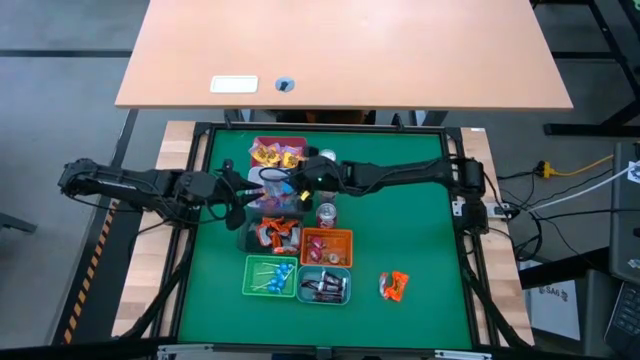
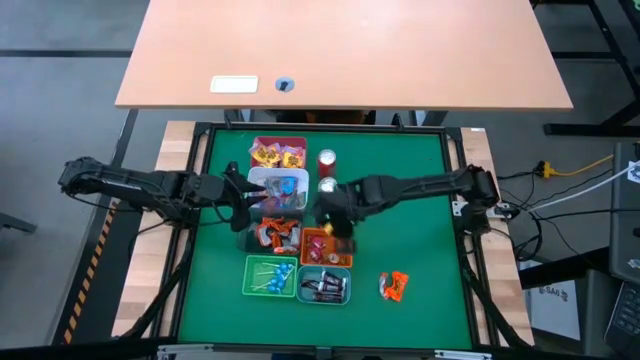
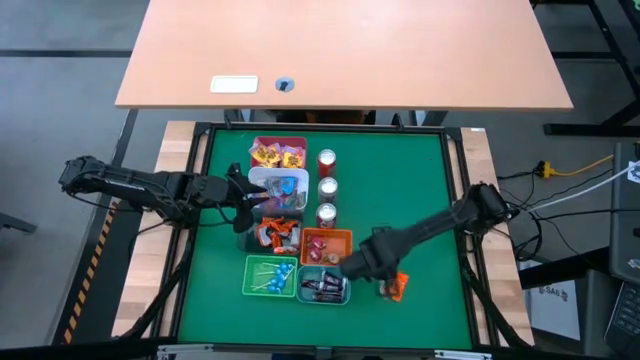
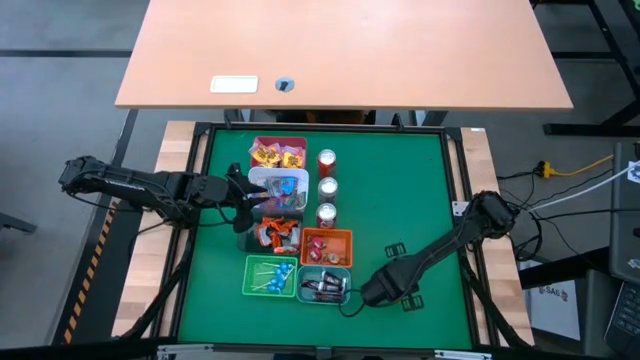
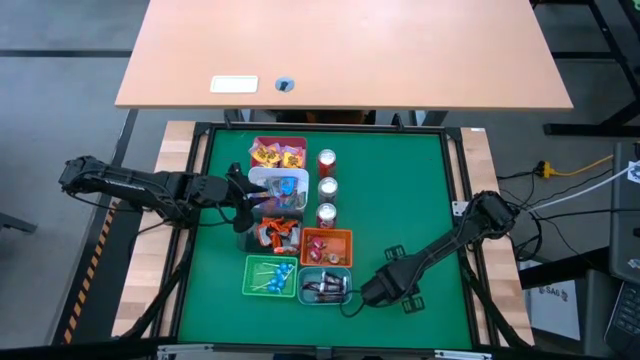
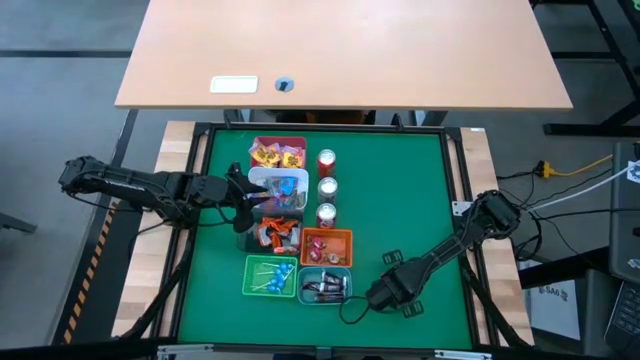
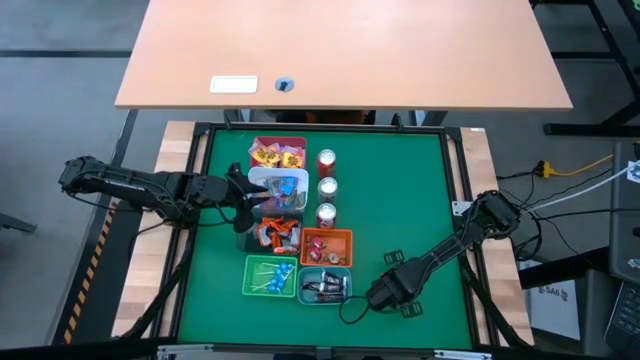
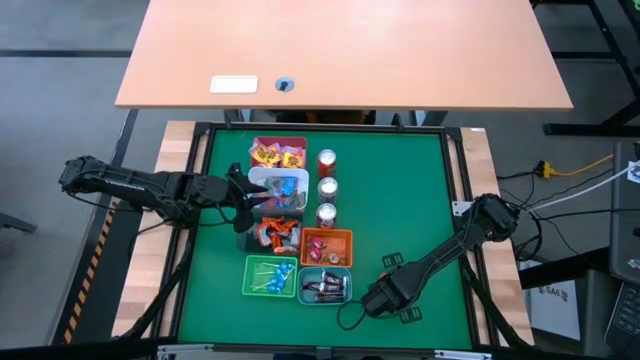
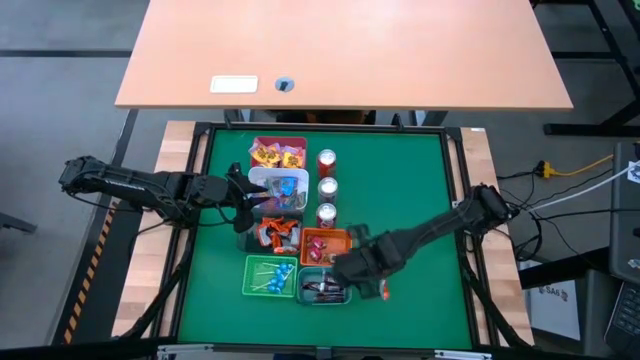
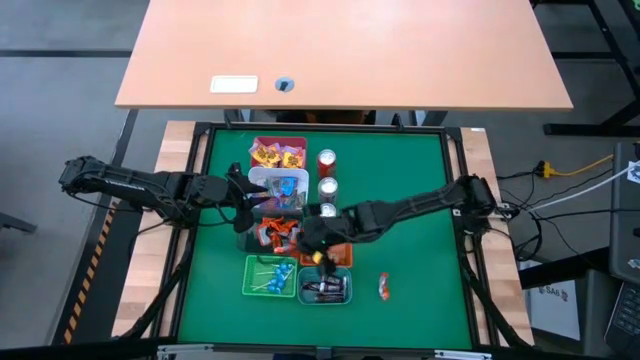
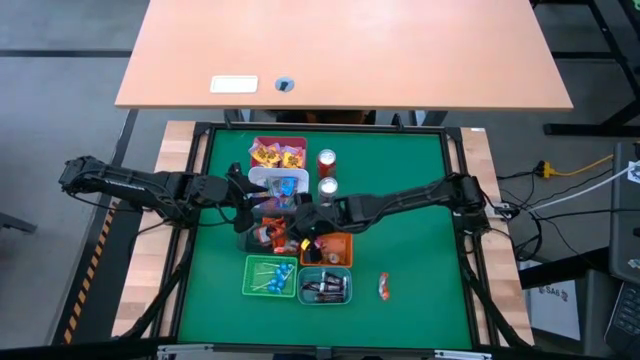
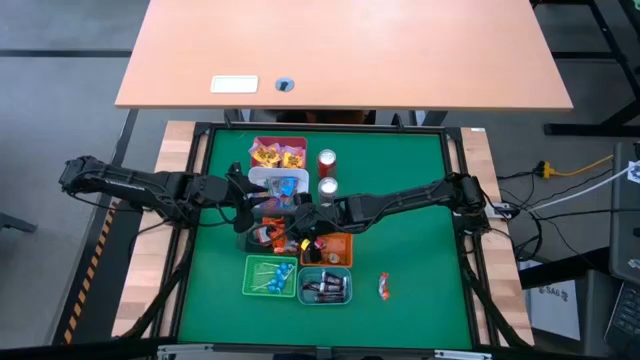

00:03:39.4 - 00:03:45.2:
Task: Sort candy
Put the orange chocolate into the black bin

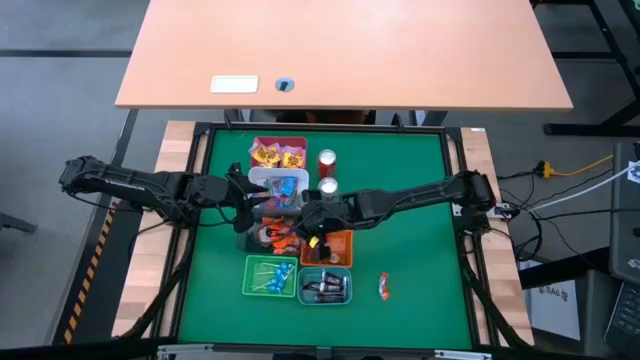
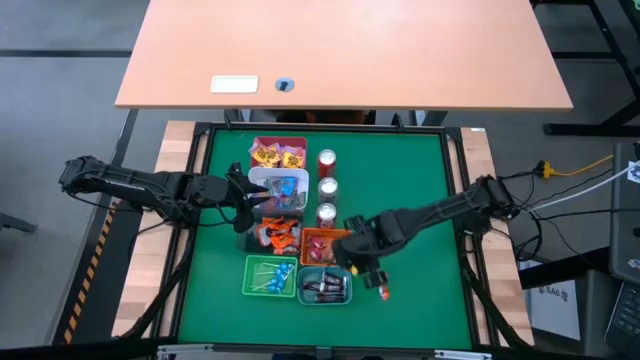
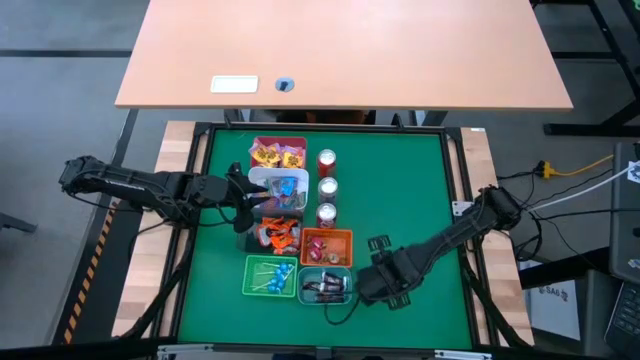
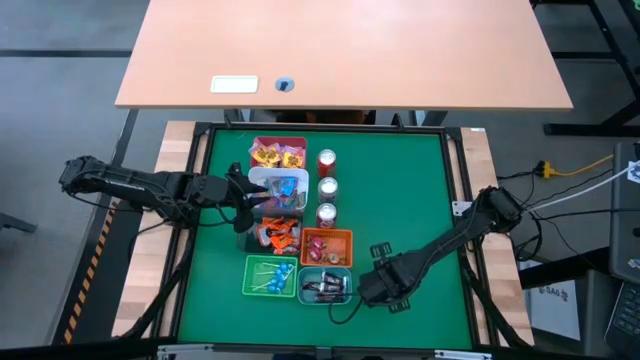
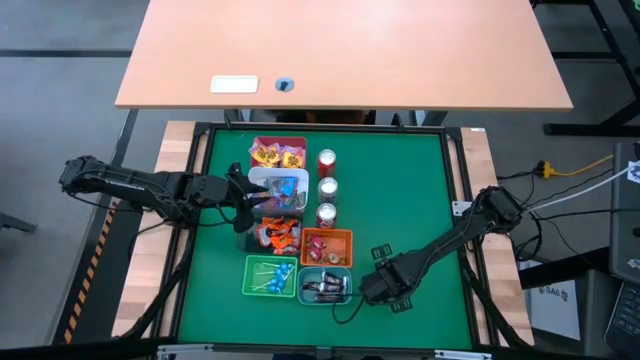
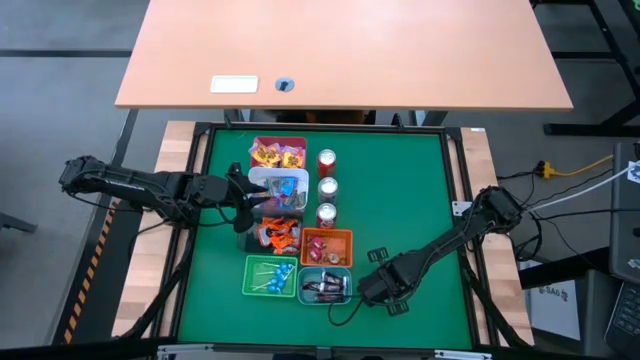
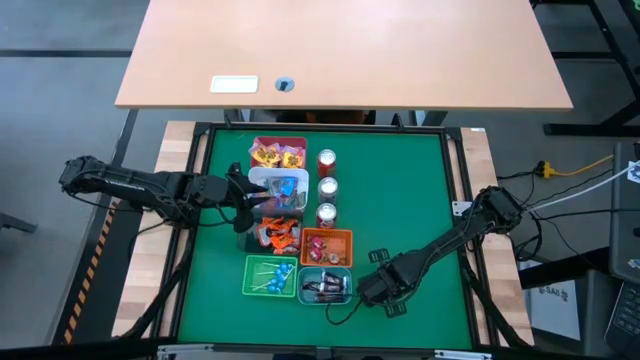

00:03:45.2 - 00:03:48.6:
Put the orange chocolate into the black bin

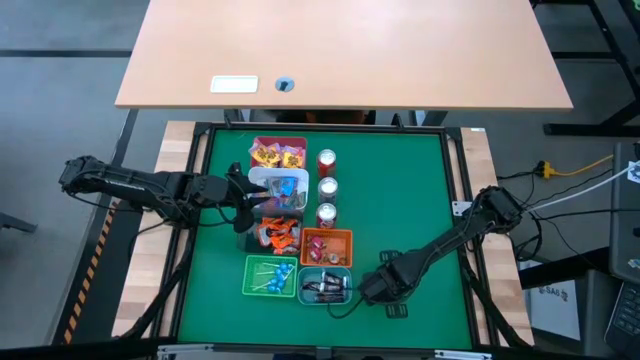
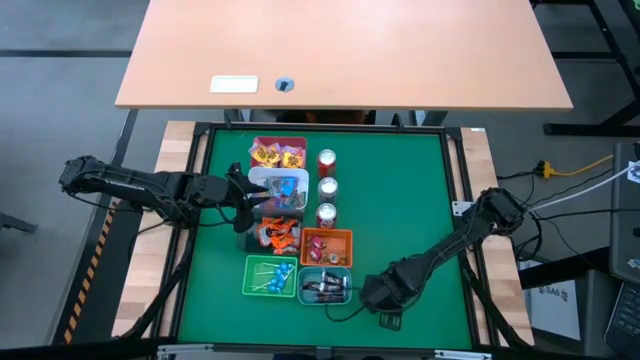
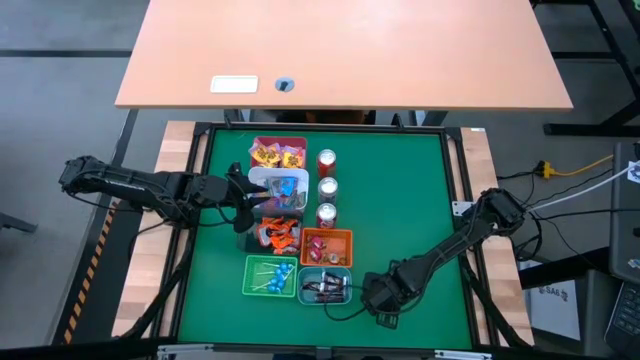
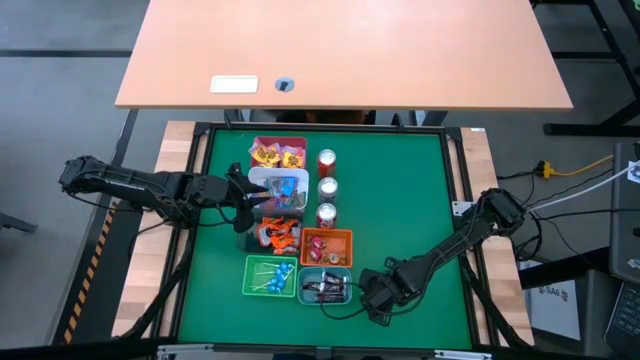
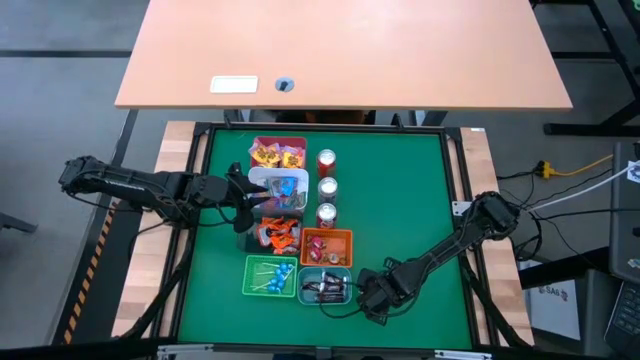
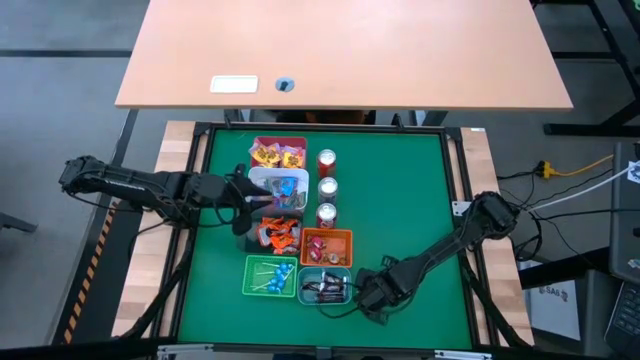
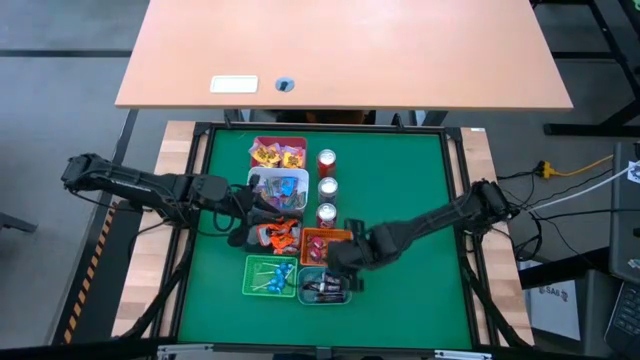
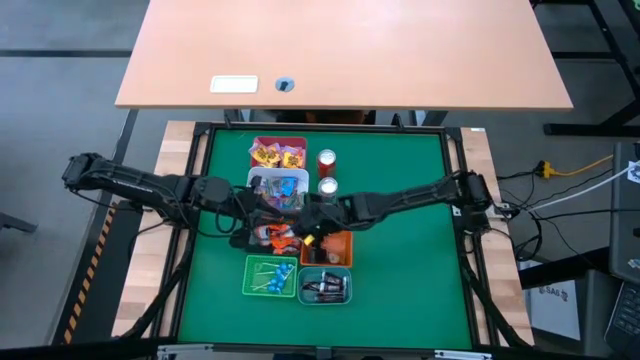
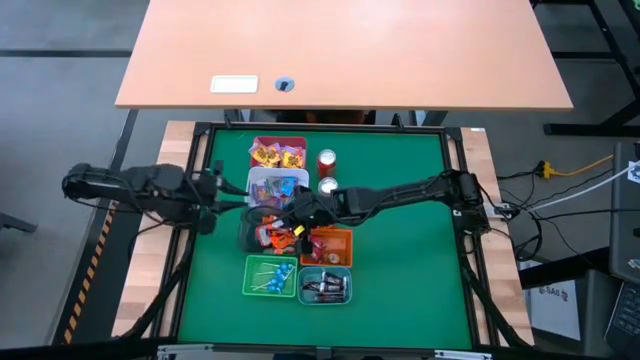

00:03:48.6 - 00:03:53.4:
Put the orange chocolate into the black bin

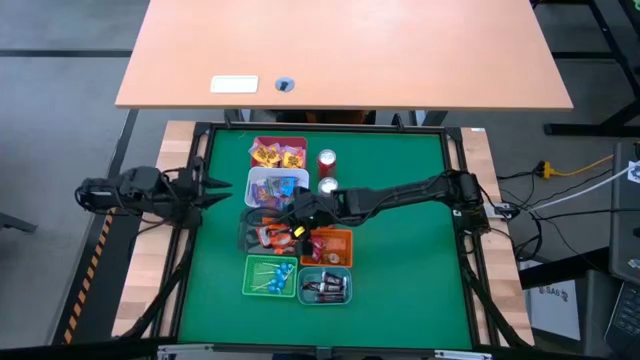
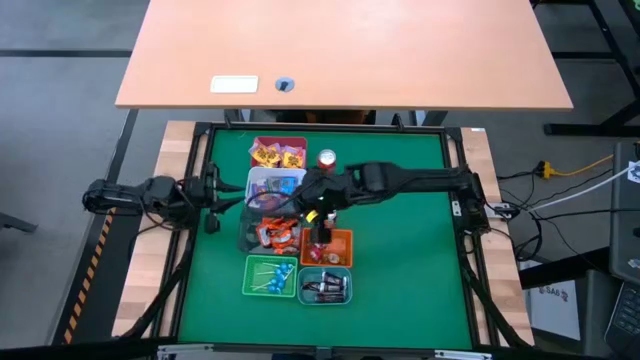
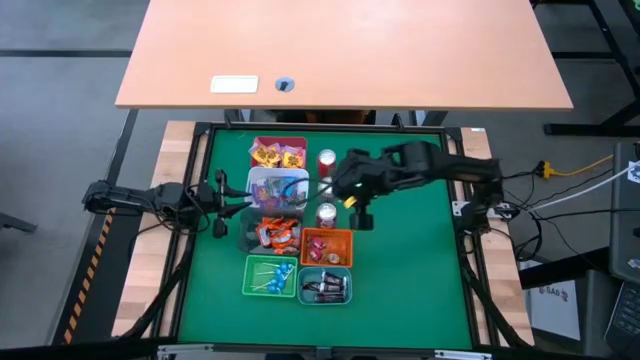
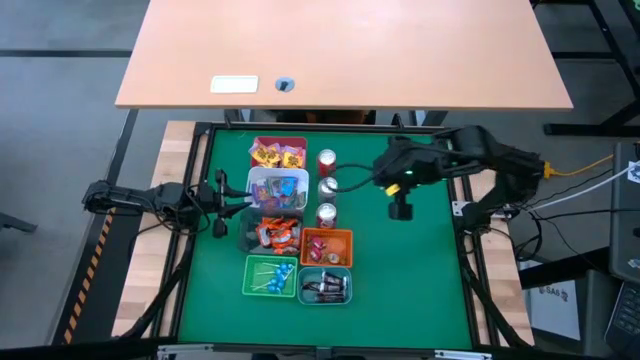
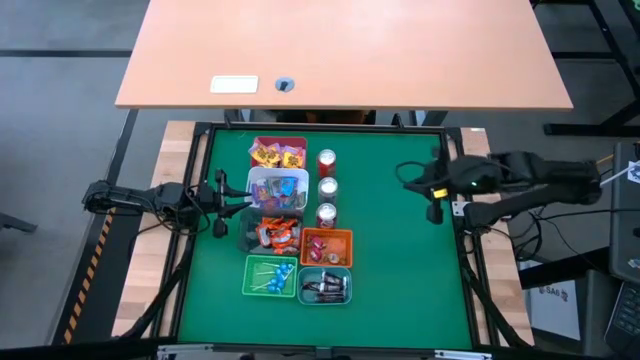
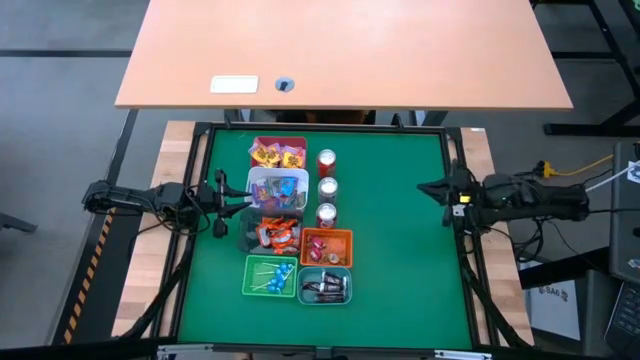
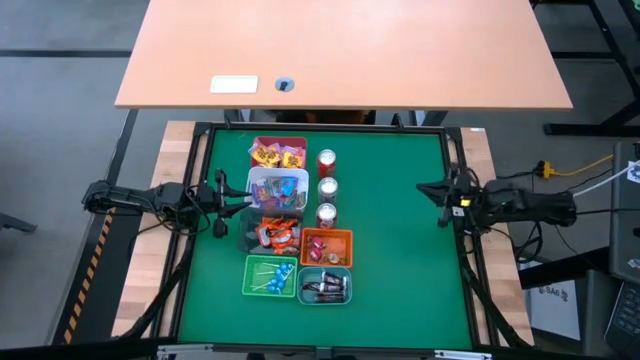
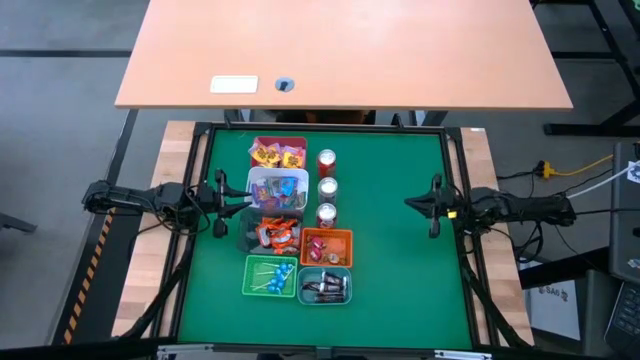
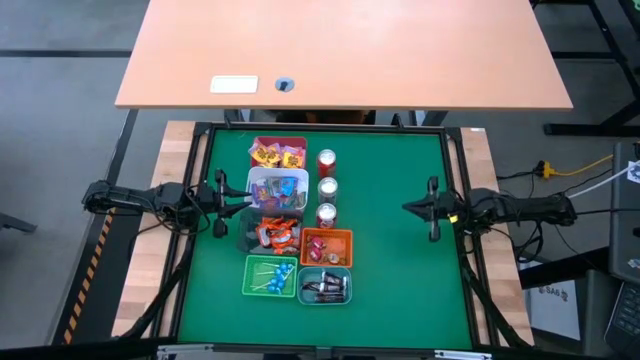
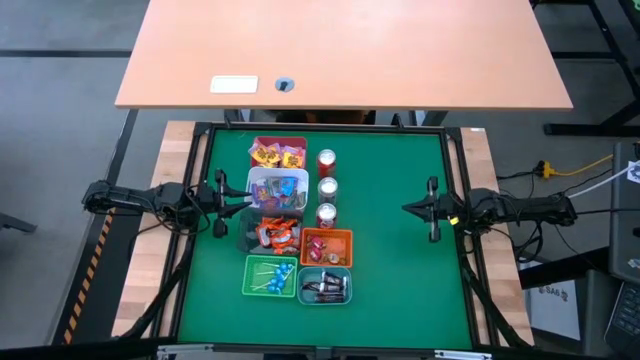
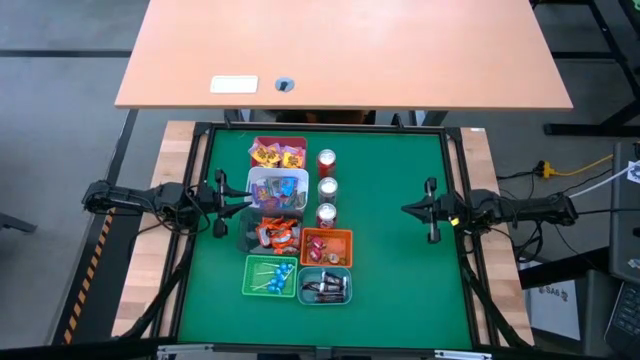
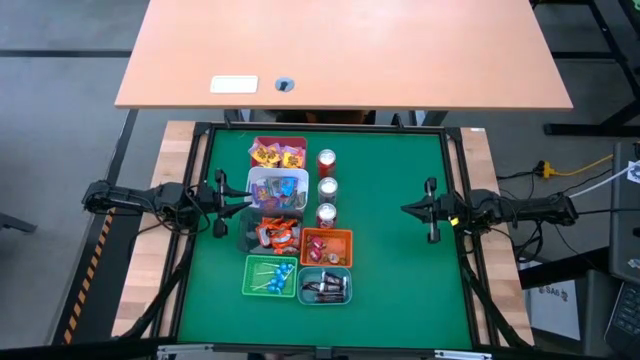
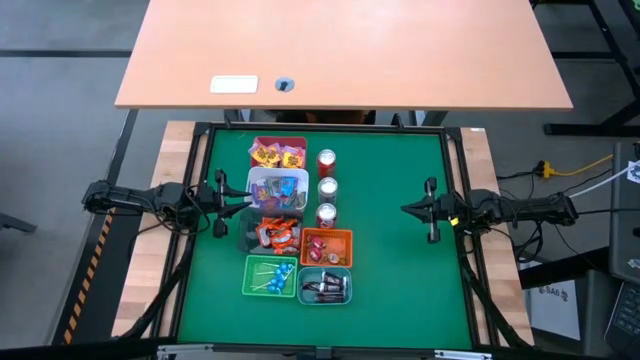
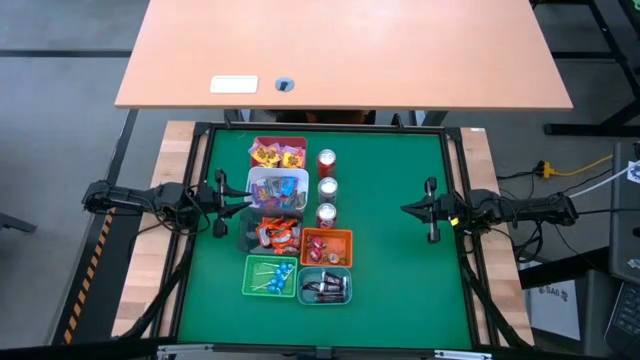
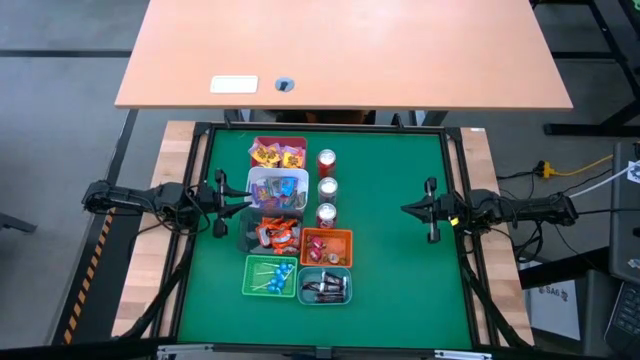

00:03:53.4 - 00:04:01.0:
Return to Home Position
